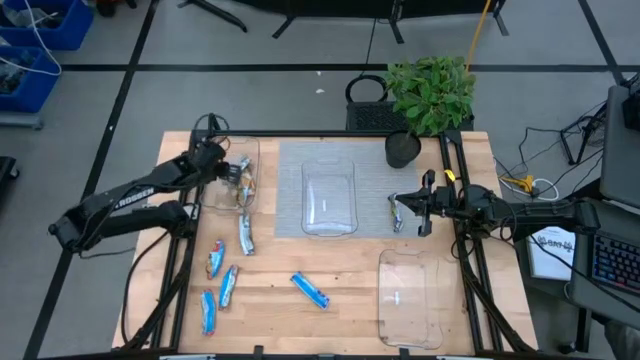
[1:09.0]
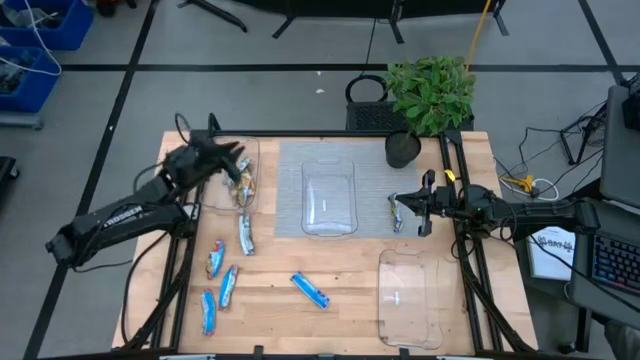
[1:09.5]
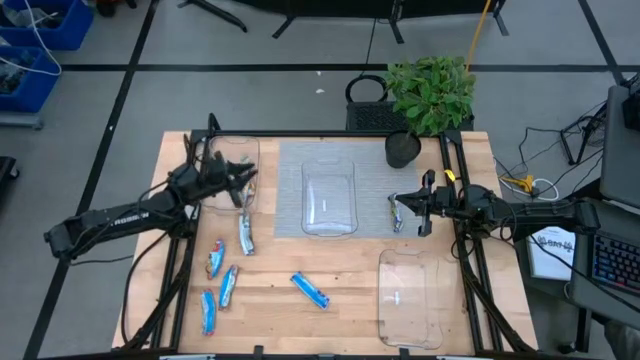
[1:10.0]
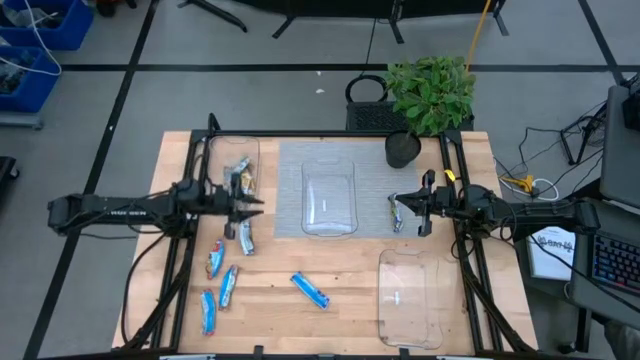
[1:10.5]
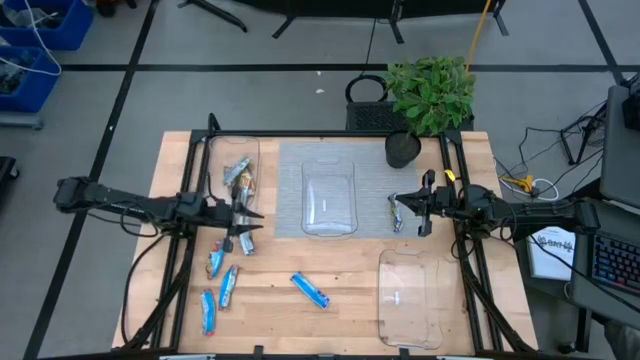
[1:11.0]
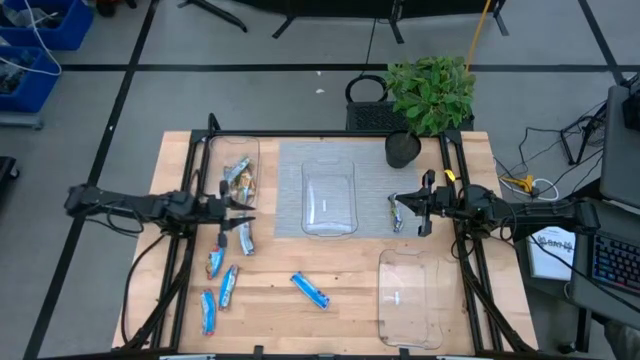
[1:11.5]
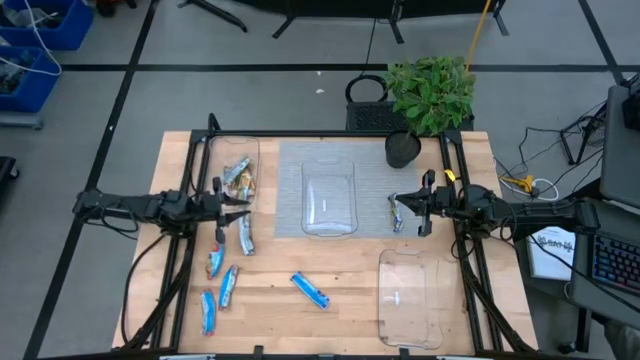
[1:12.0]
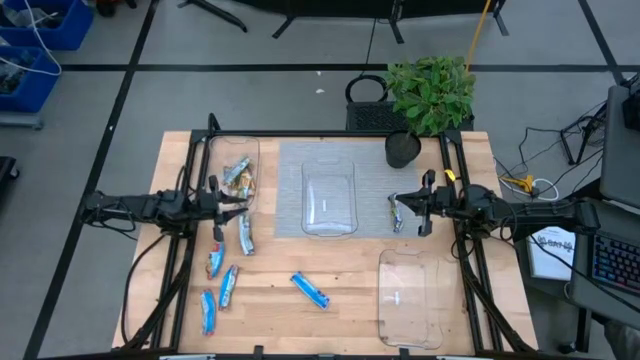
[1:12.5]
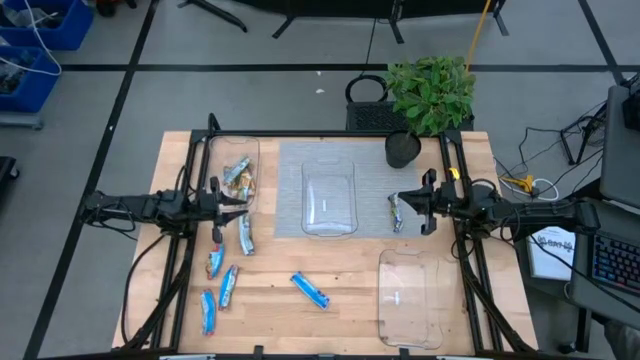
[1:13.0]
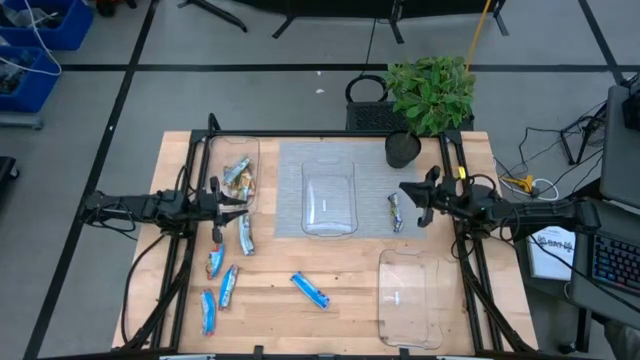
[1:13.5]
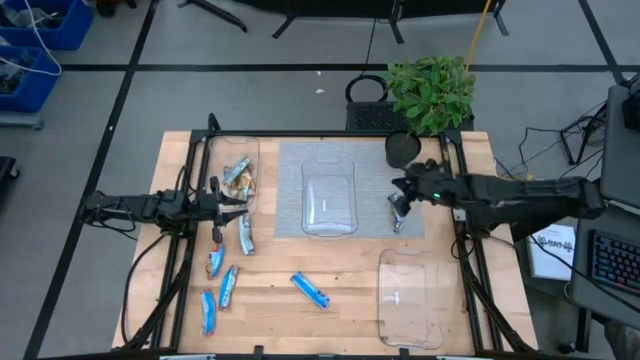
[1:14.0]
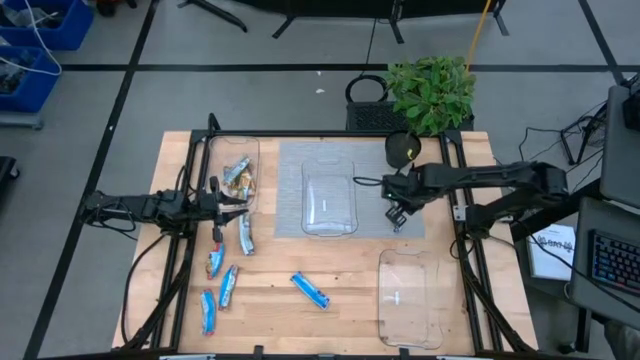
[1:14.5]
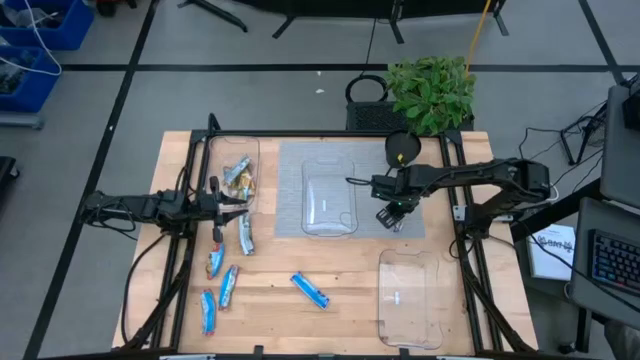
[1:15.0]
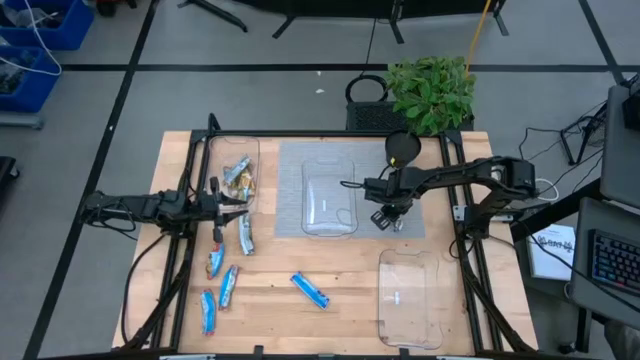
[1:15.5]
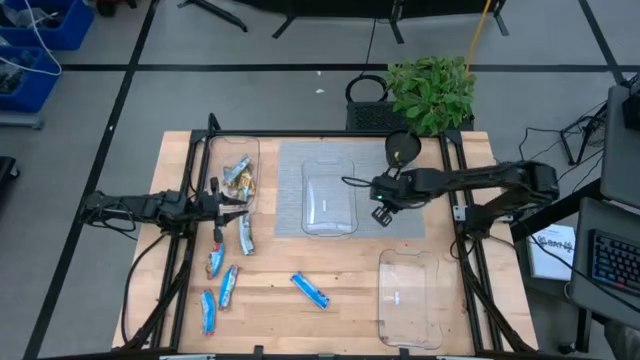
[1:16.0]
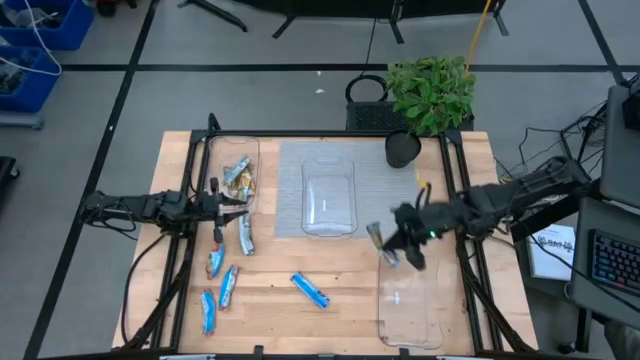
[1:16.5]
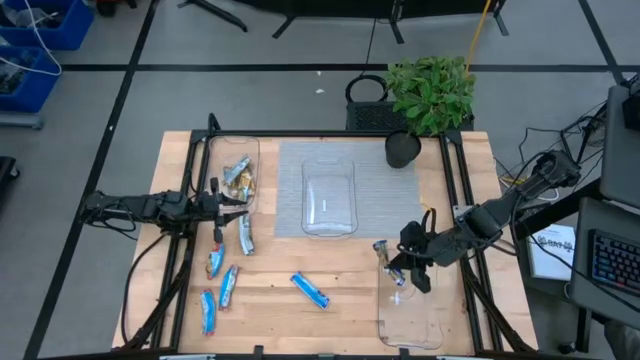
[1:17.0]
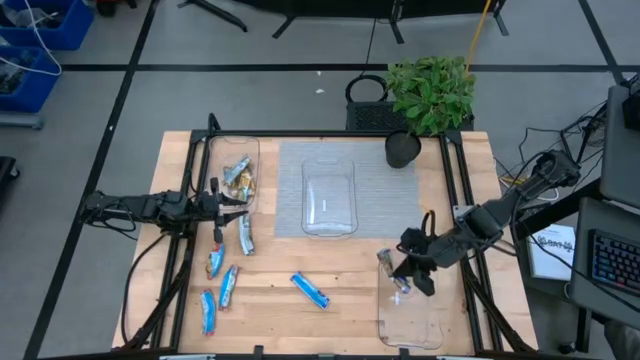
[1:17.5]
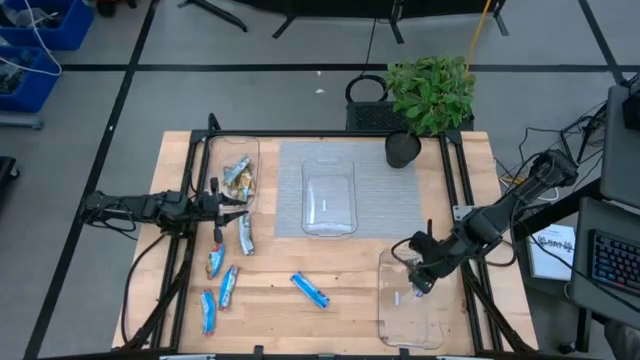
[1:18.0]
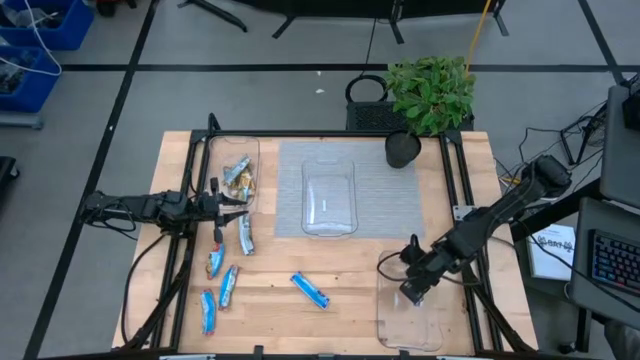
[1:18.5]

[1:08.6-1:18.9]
Task: Pick and place Granola Bars by type
Put the blue granola bar into the bottom right transparent bin

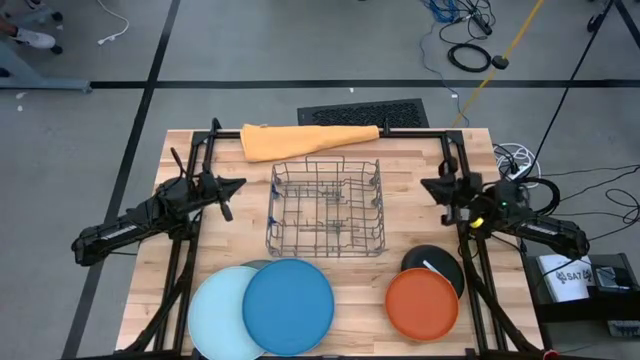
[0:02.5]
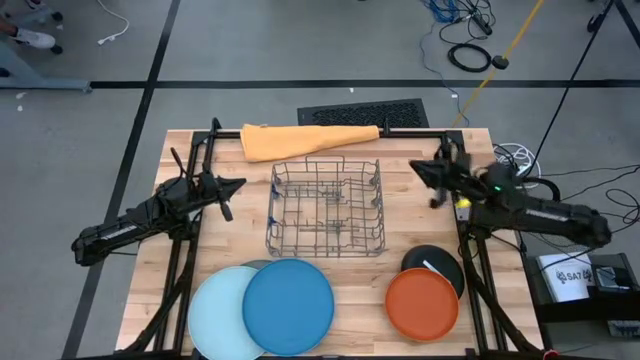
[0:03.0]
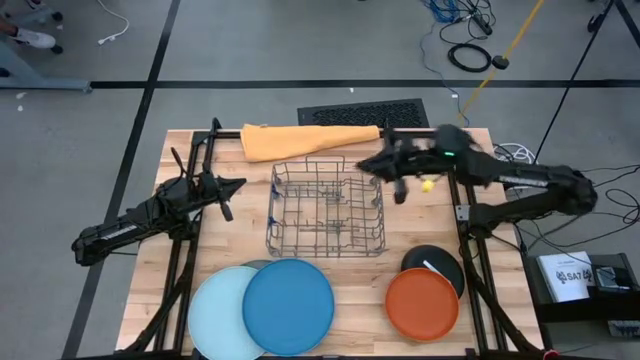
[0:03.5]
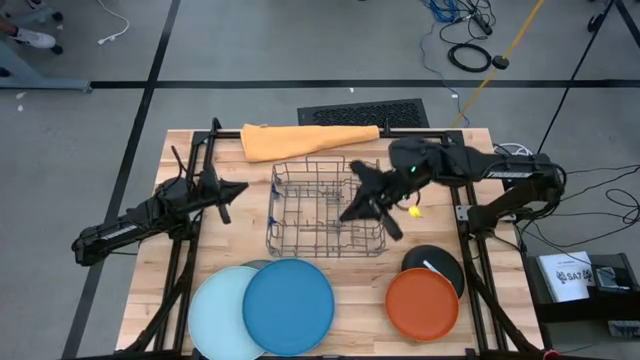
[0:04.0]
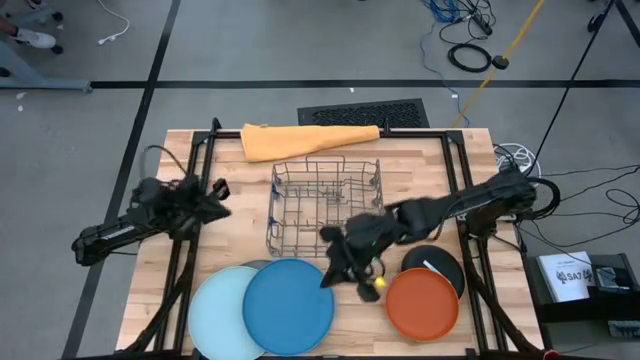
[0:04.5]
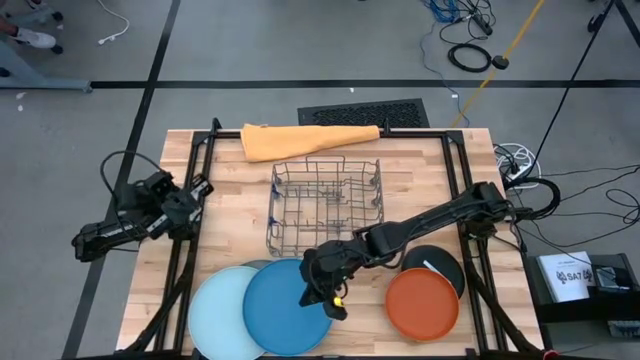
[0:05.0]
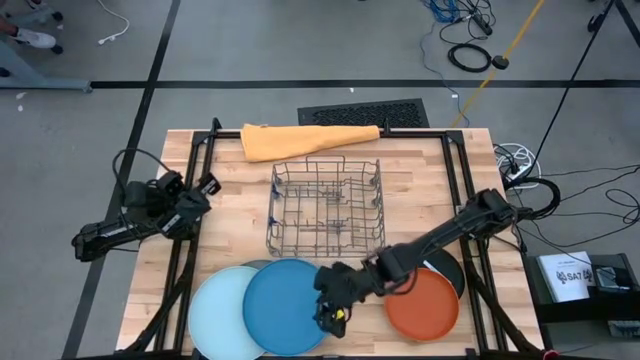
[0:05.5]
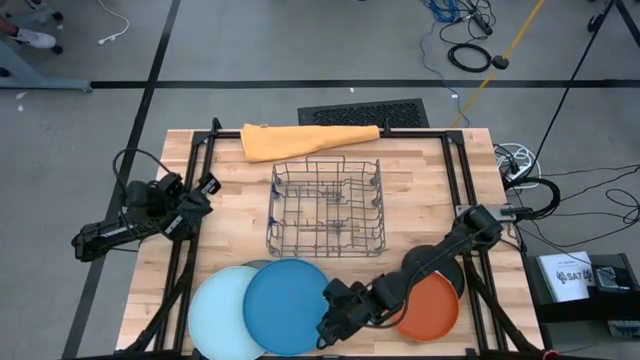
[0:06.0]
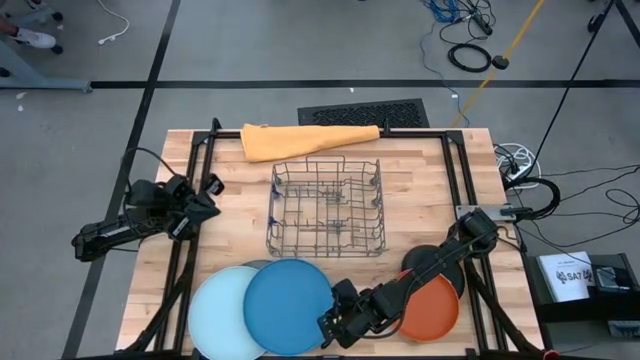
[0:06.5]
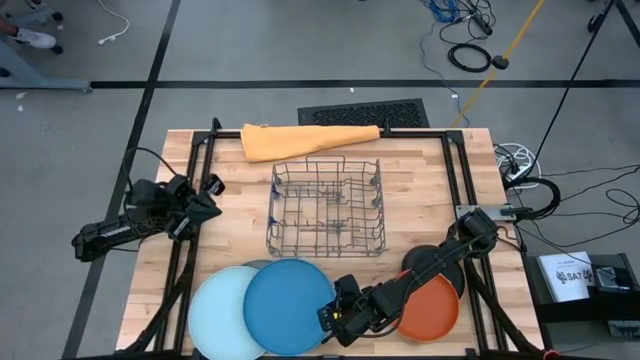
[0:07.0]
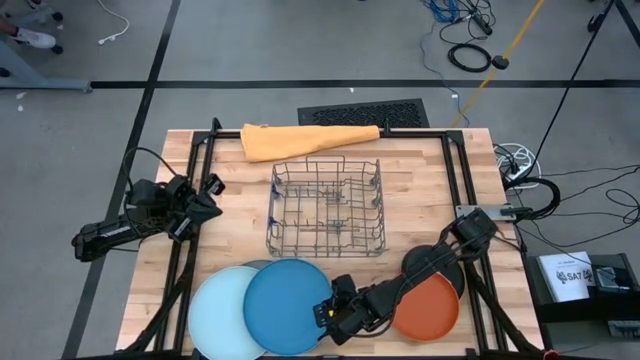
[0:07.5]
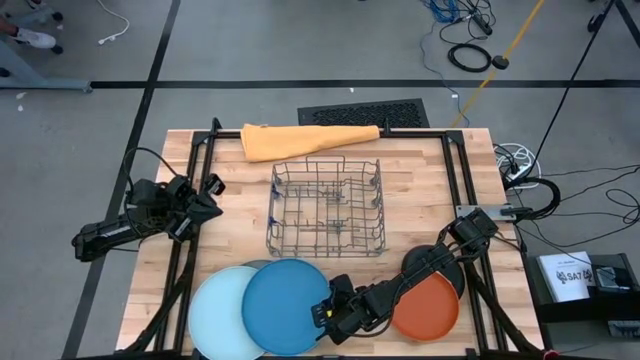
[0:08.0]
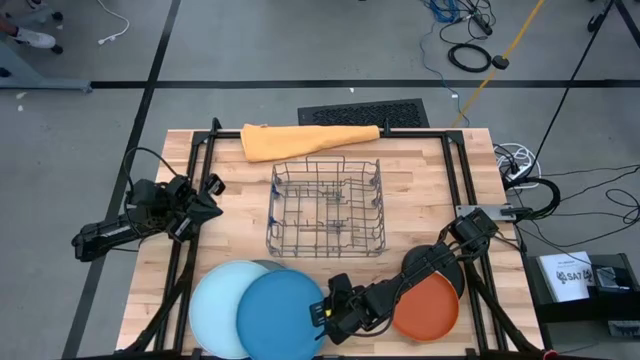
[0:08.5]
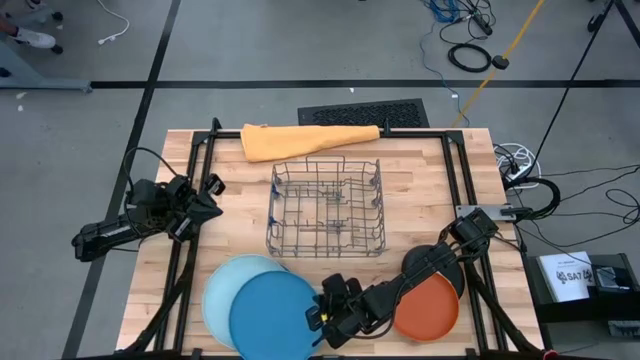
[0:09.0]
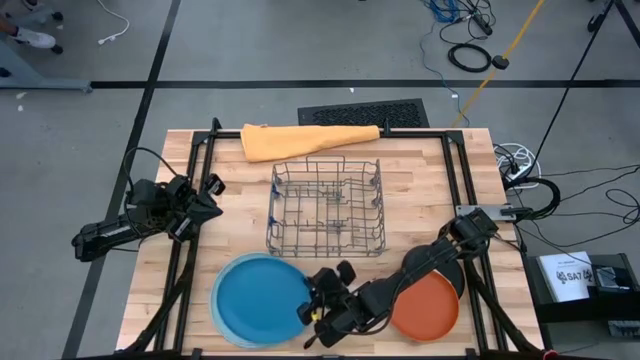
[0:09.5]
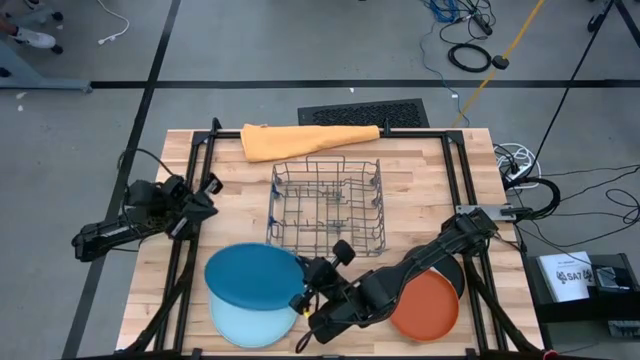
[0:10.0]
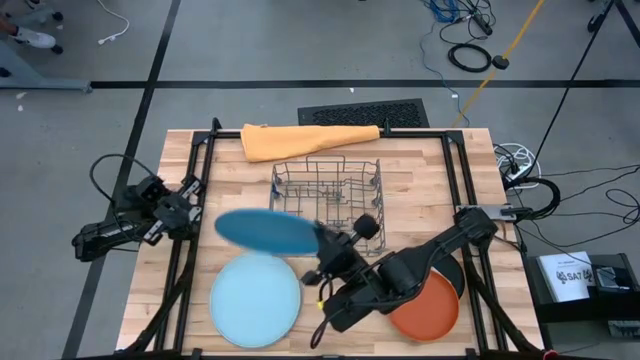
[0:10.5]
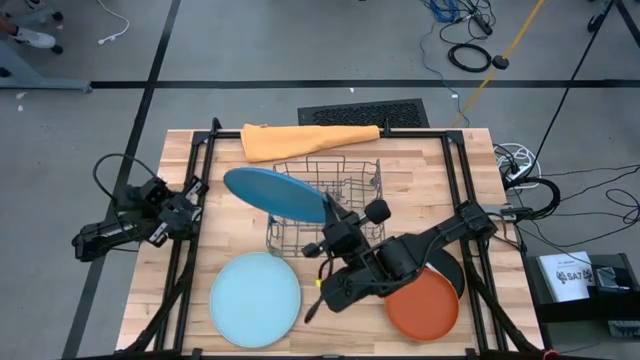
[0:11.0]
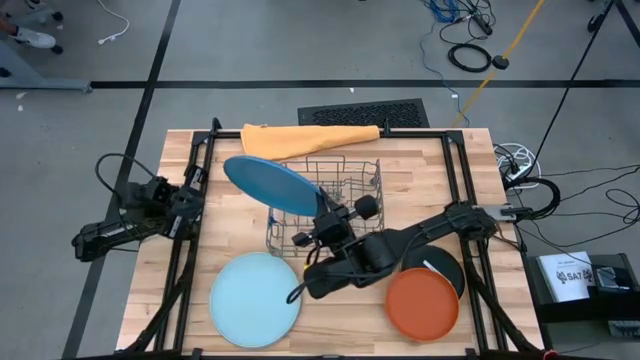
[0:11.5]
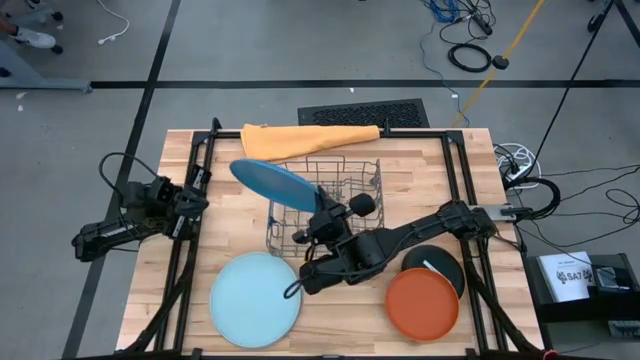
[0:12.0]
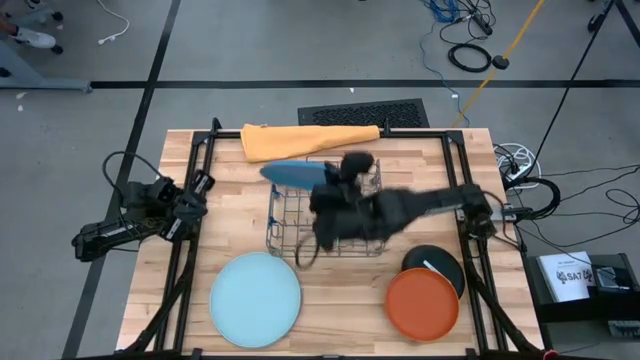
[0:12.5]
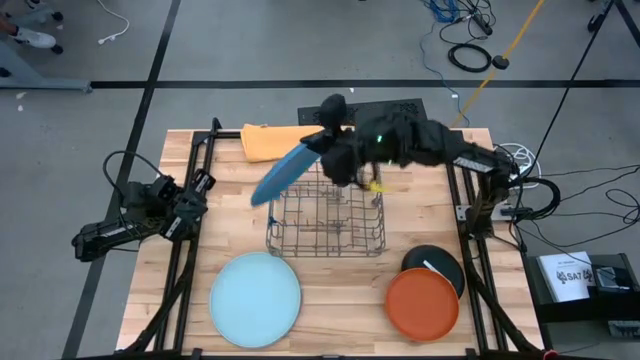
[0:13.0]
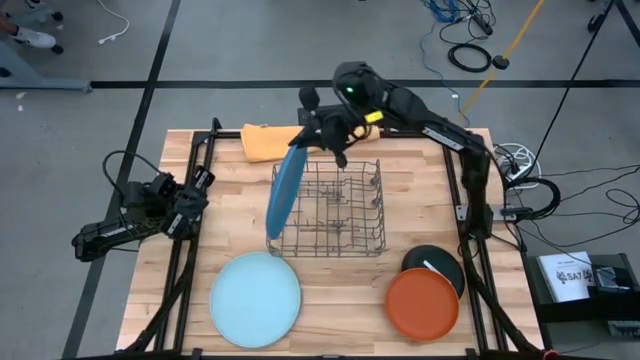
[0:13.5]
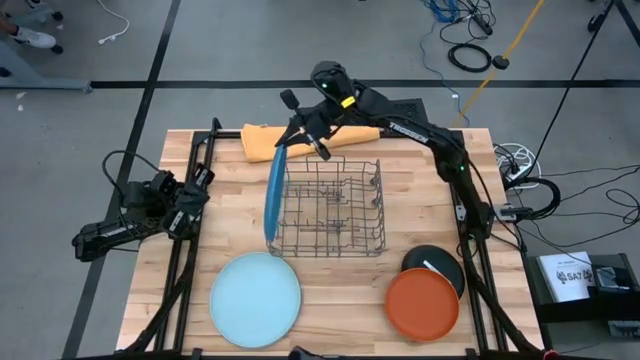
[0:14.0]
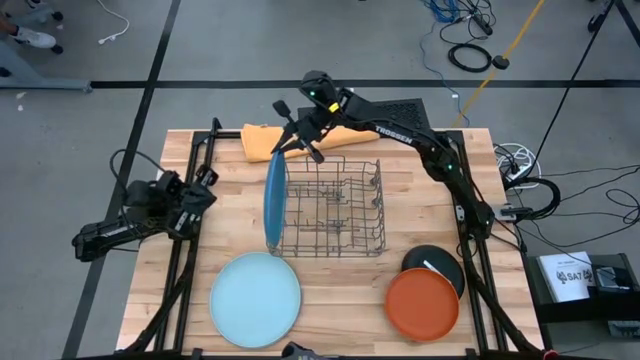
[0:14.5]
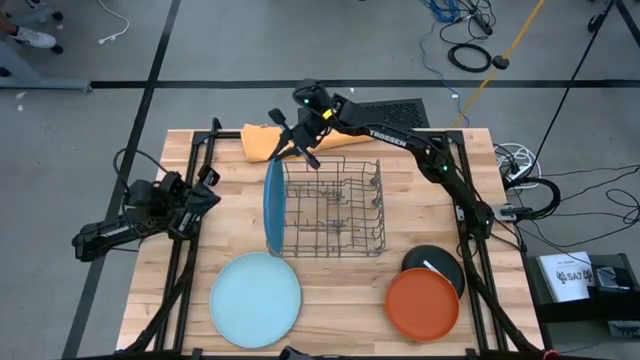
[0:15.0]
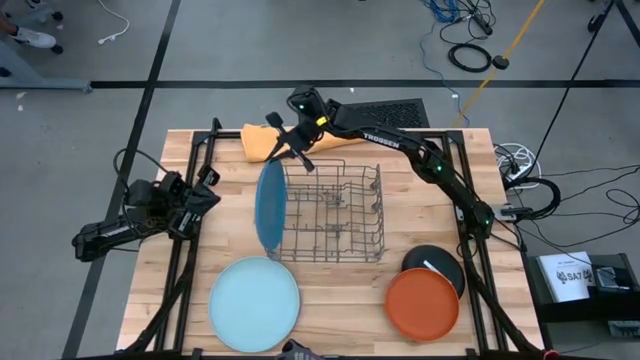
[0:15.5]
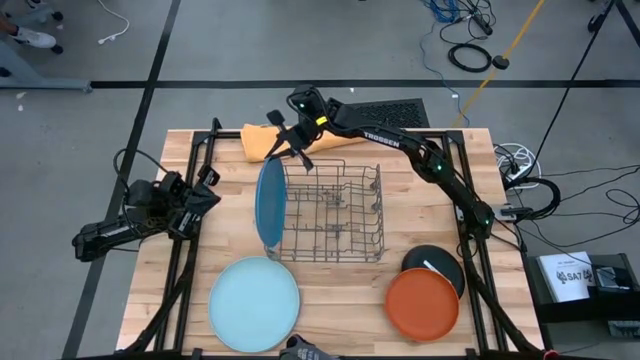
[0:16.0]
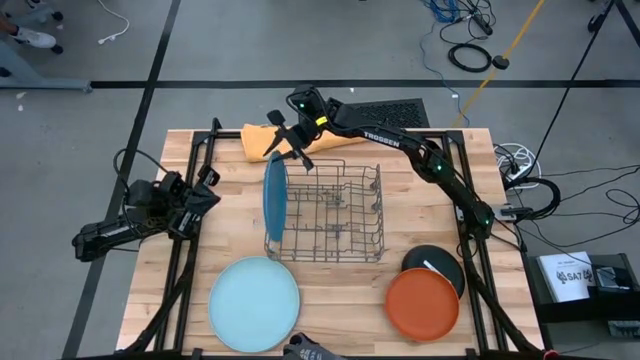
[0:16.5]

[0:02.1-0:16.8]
Task: Sort dishes
Put the blue plate in the dish rack
